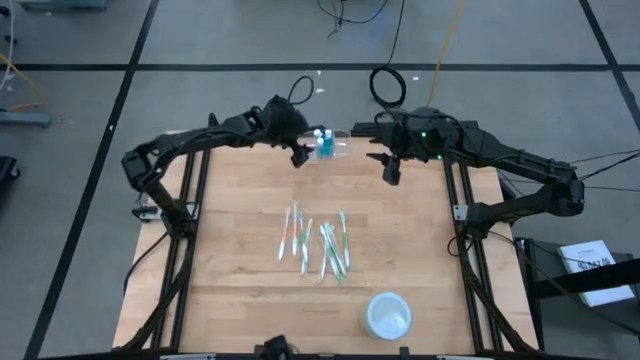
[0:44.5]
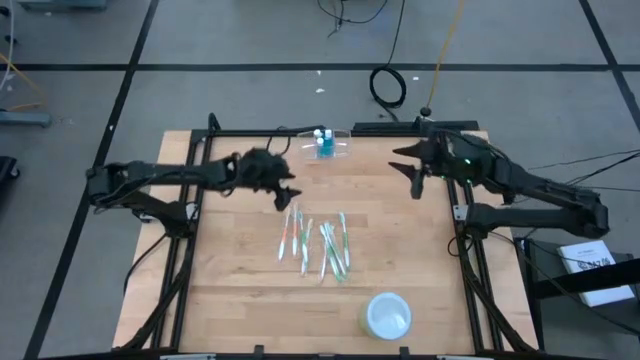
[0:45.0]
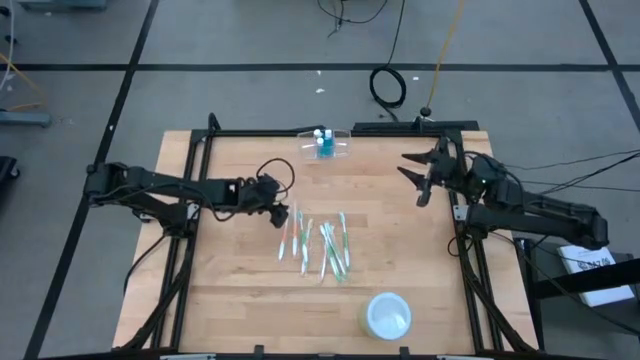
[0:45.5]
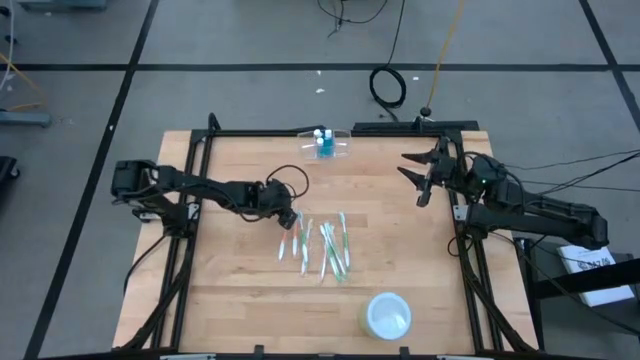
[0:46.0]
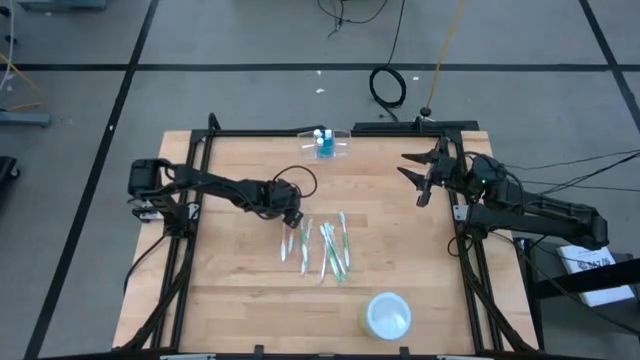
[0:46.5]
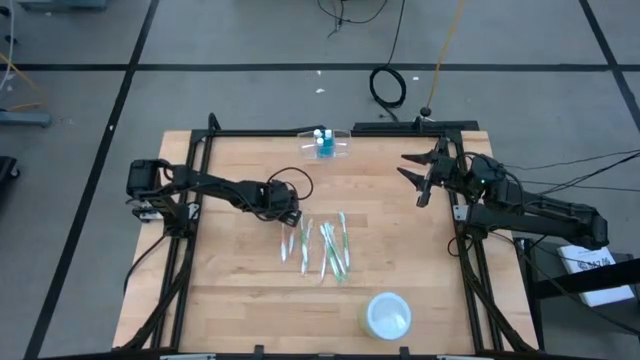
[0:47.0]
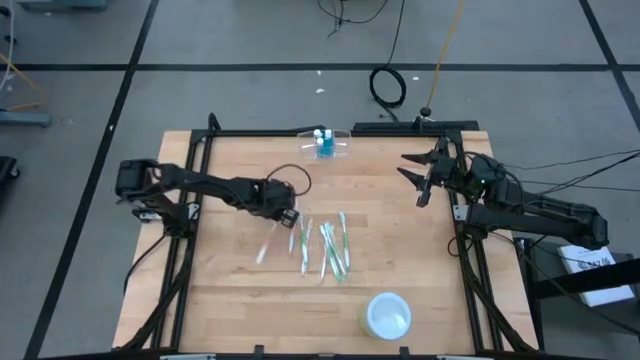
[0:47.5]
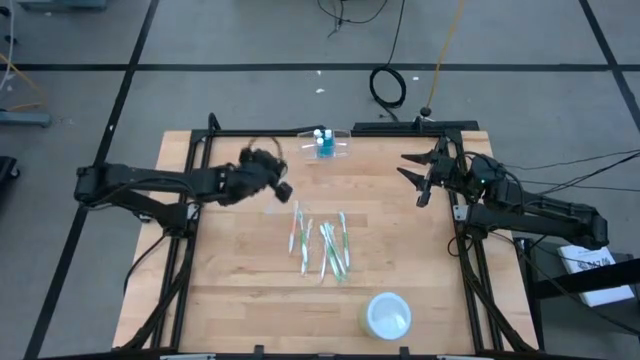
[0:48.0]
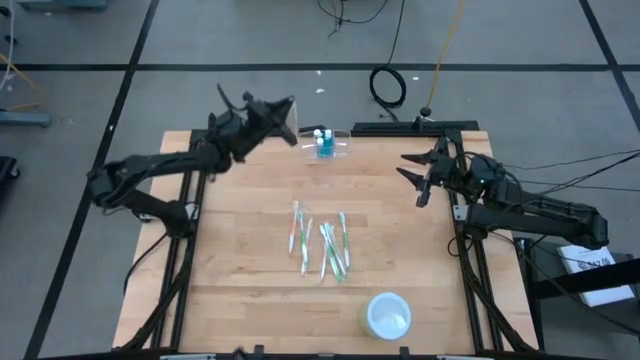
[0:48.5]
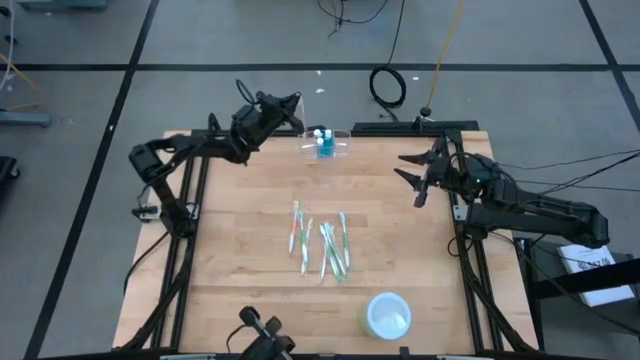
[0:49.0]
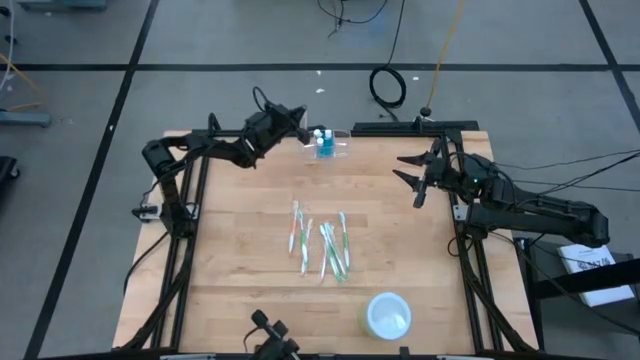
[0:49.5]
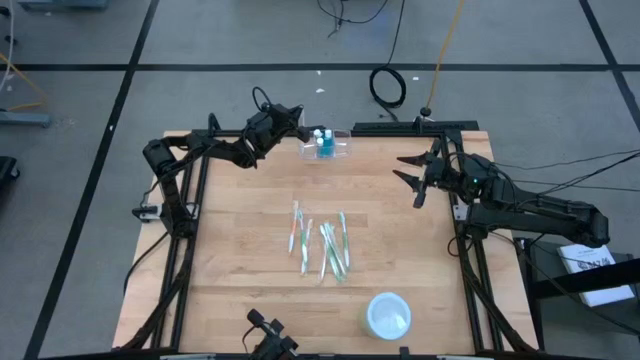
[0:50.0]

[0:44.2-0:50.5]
Task: Pick & Place toothbrushing station
Put the orange toothbrush into the transparent organizer

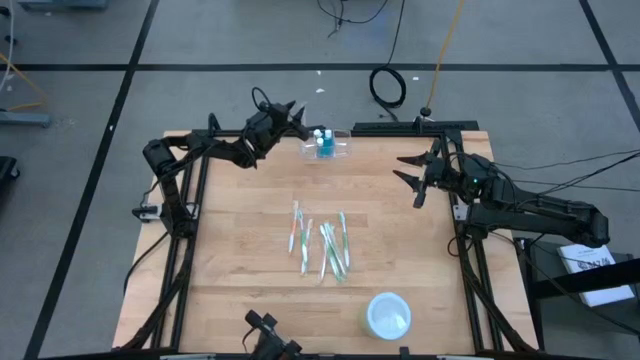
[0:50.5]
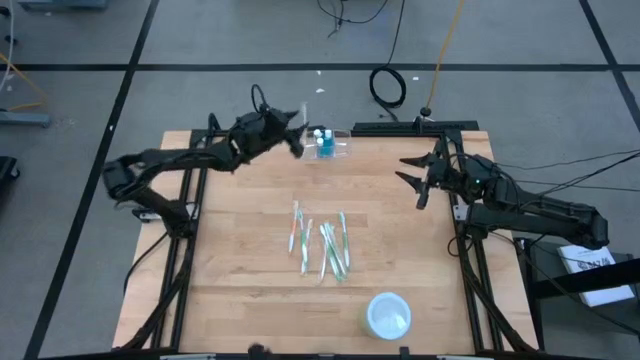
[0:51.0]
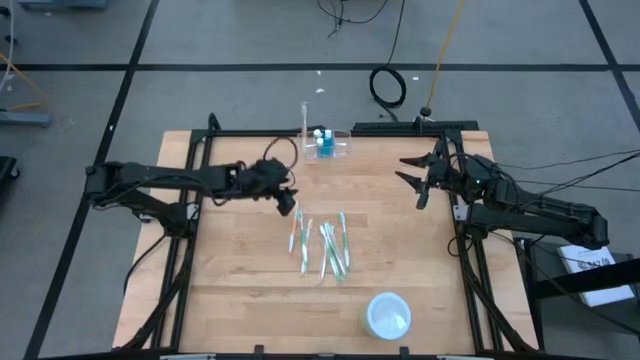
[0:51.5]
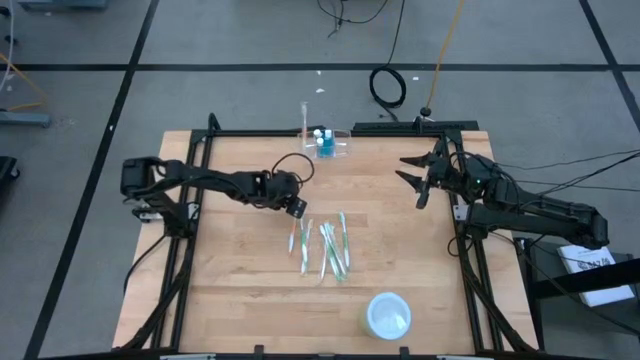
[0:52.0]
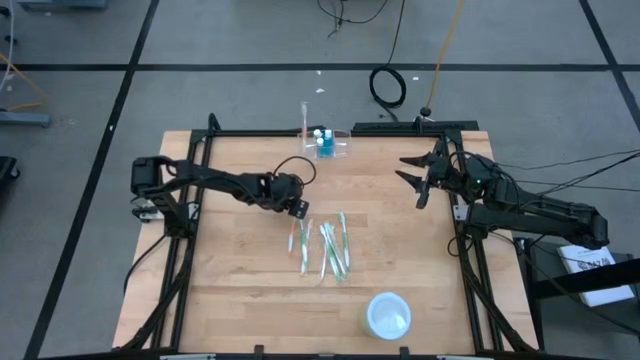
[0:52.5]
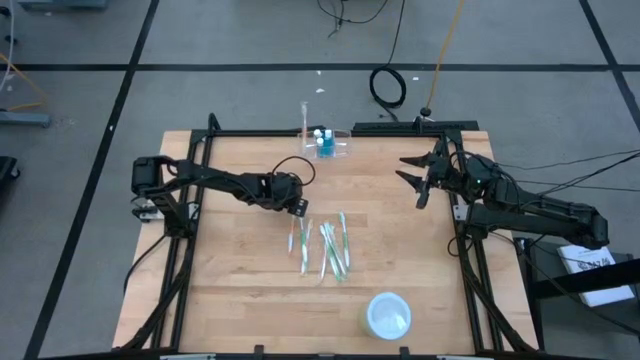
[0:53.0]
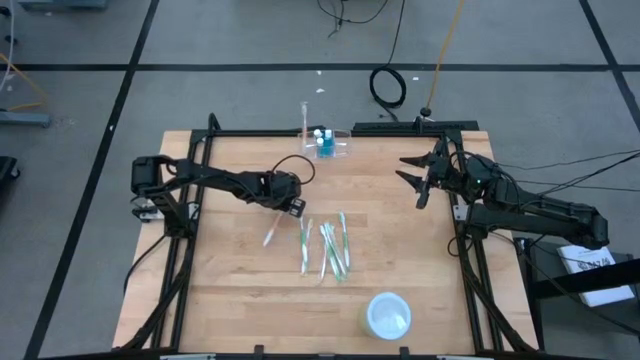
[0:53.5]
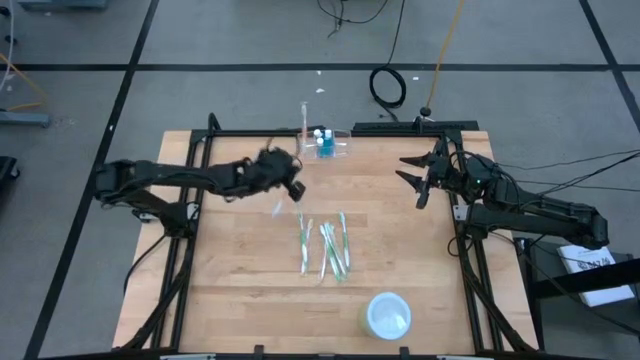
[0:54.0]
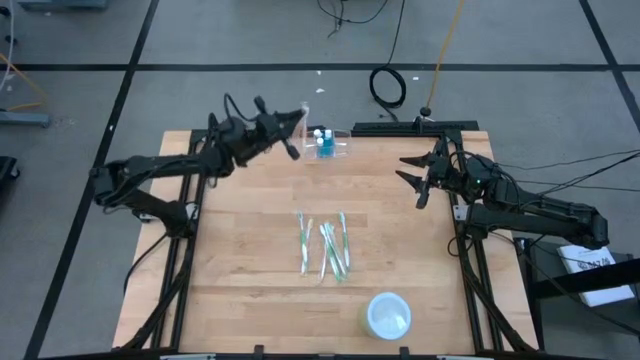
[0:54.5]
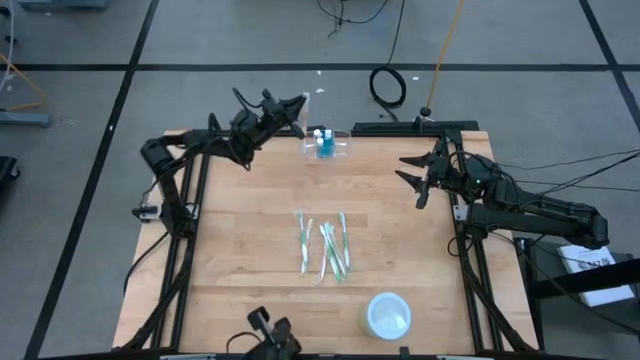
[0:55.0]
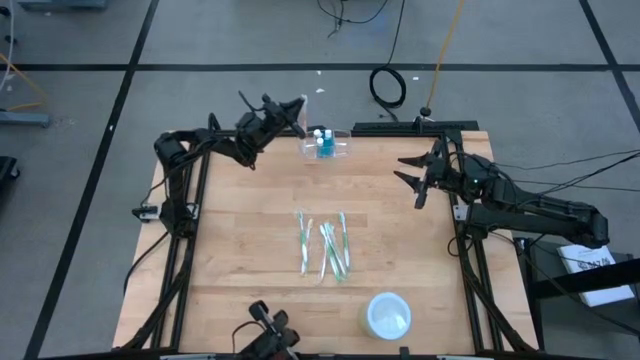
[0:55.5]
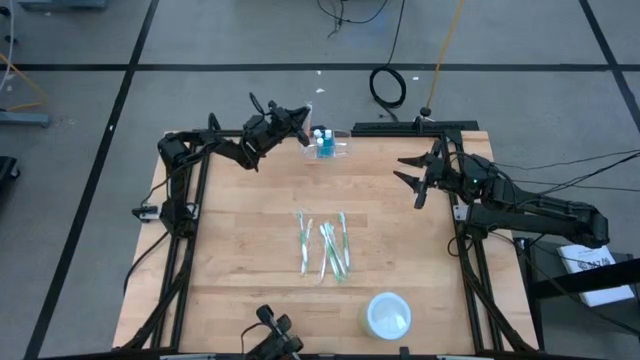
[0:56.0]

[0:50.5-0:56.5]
Put the orange toothbrush into the transparent organizer

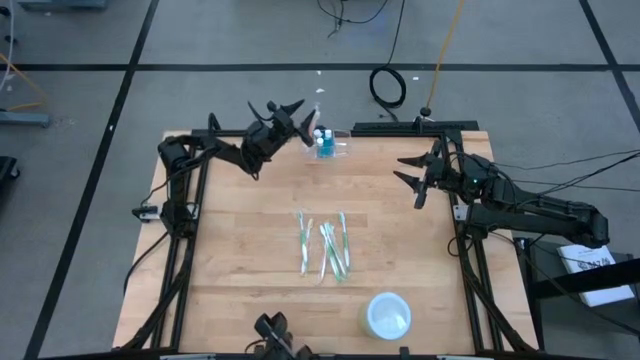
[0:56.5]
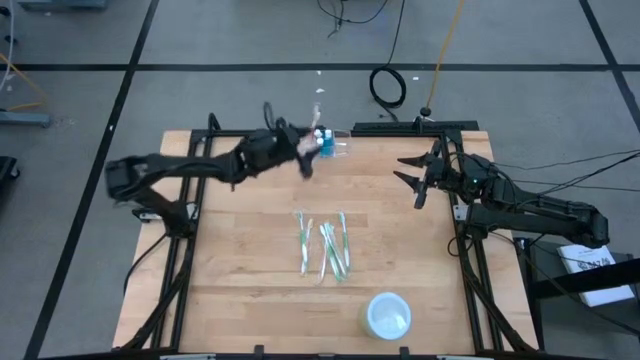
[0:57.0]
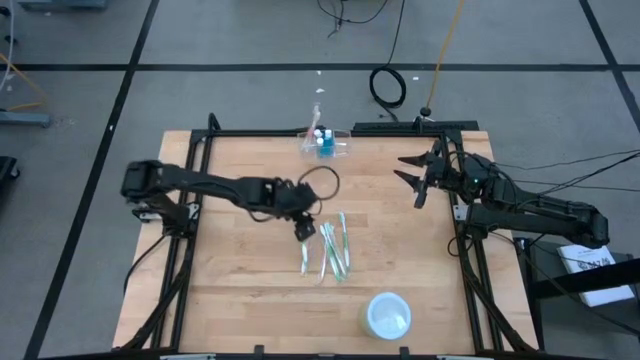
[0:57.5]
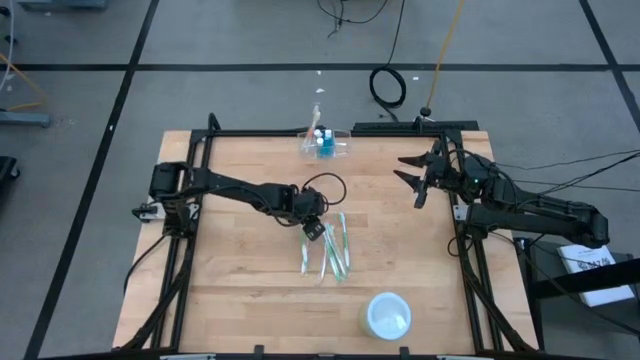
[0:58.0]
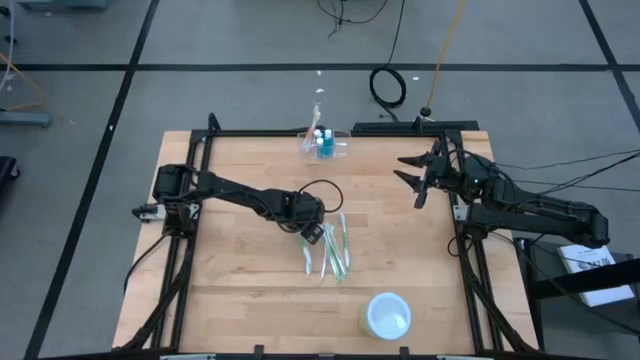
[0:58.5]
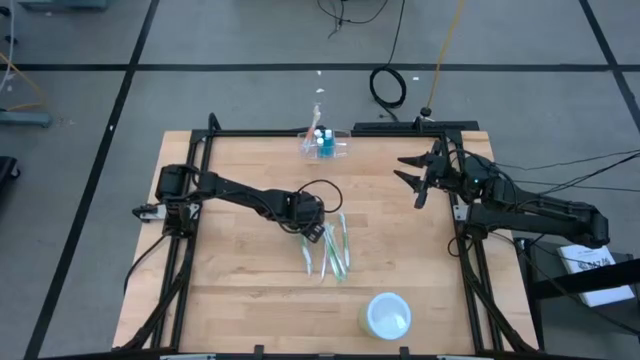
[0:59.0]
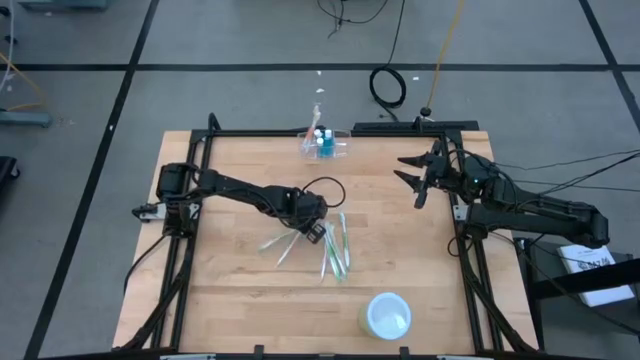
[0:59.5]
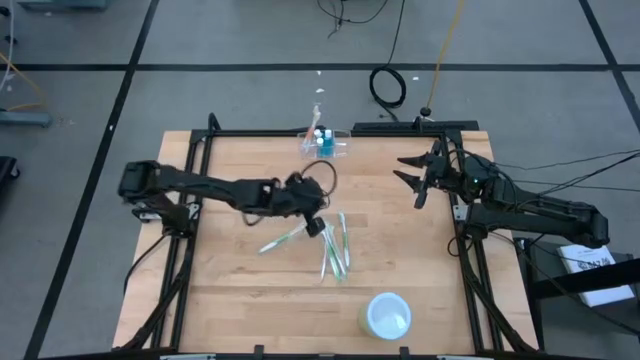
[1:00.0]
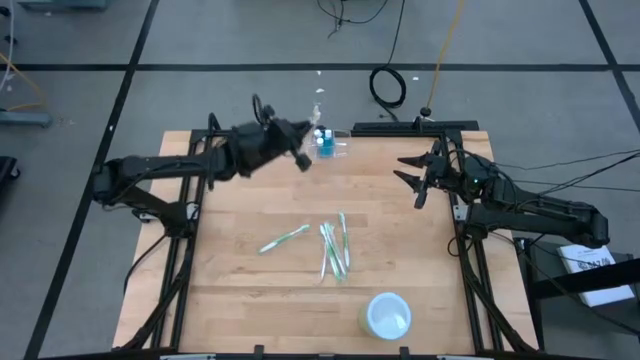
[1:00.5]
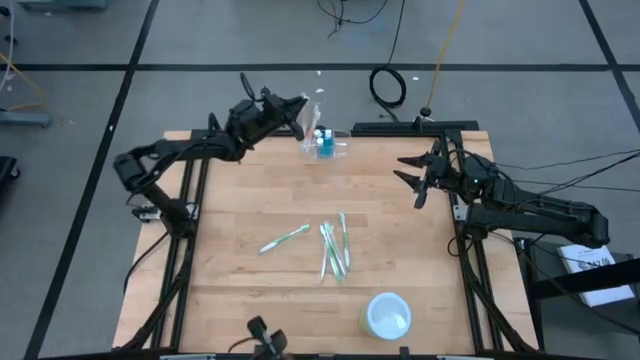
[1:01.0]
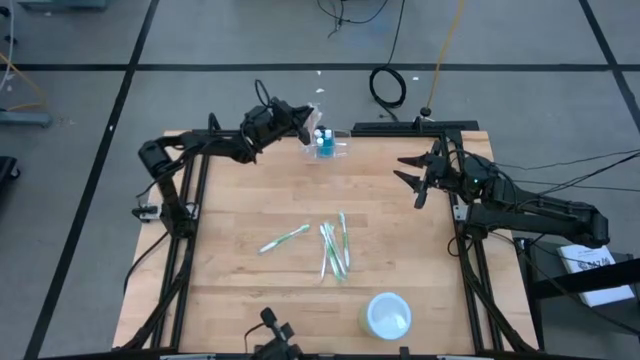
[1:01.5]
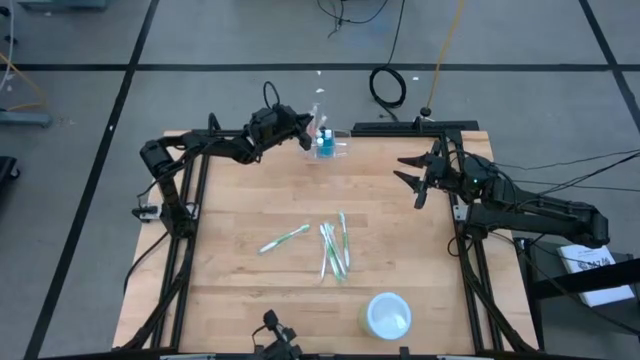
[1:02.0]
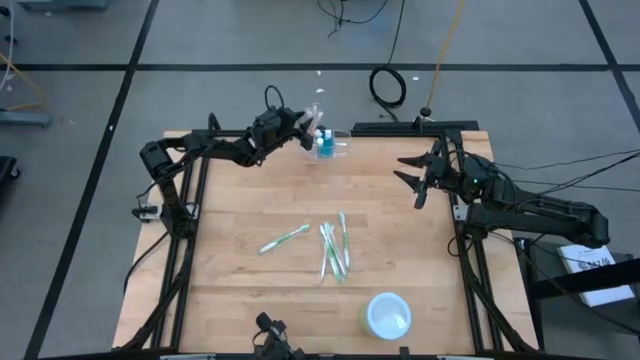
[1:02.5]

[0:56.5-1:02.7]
Put the orange toothbrush into the transparent organizer

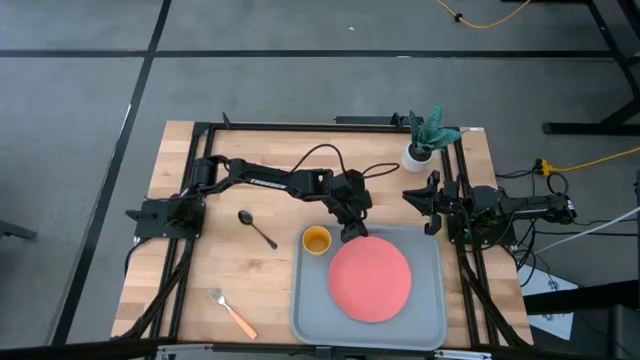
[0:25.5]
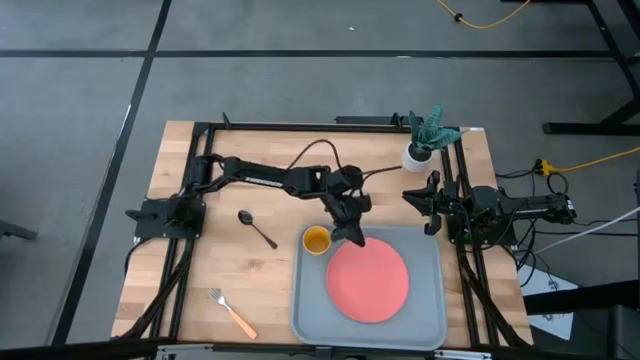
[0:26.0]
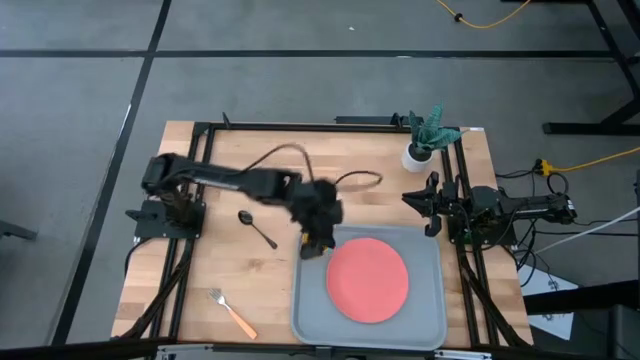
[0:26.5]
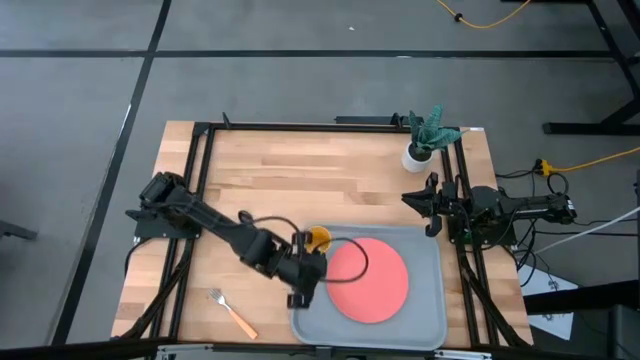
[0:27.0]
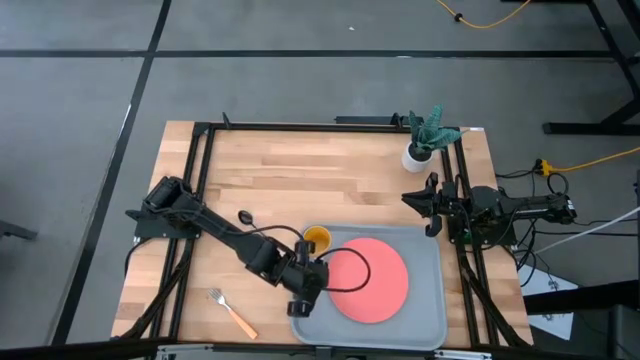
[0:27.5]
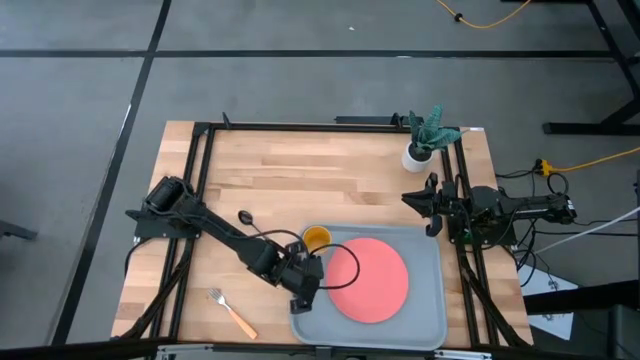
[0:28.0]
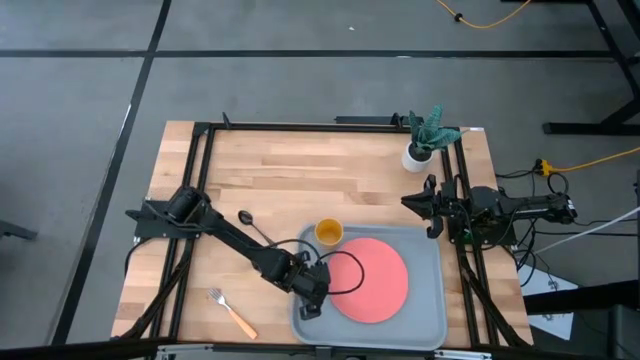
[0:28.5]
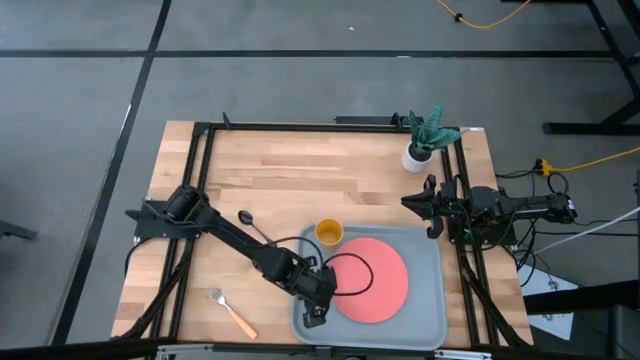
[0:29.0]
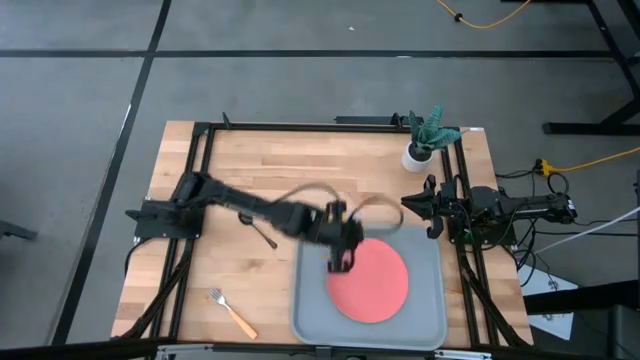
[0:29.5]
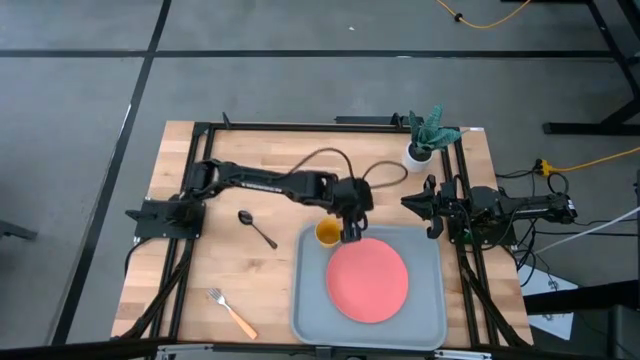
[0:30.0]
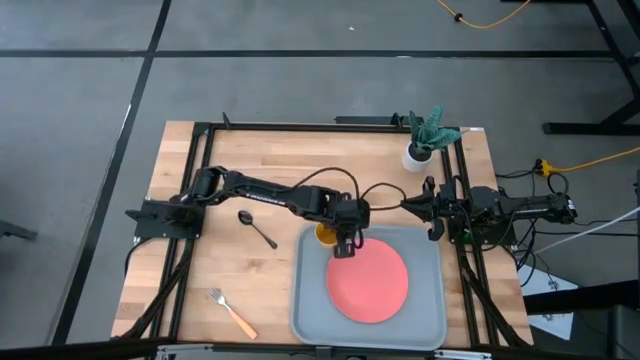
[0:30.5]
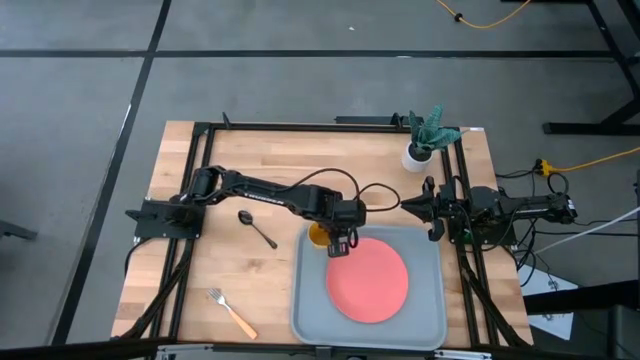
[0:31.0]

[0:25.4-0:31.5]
Task: Pick and place plate/cup/fork/spoon on tray
Adjust the yellow cup
